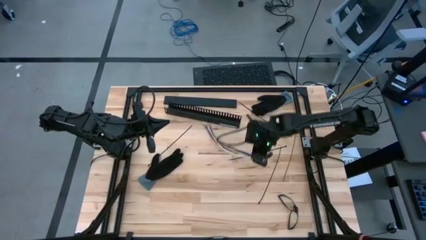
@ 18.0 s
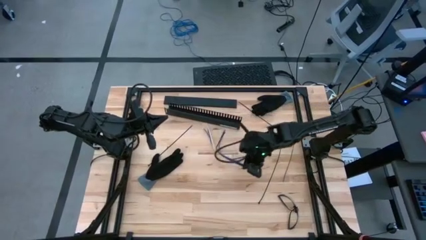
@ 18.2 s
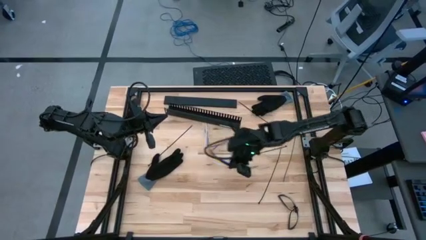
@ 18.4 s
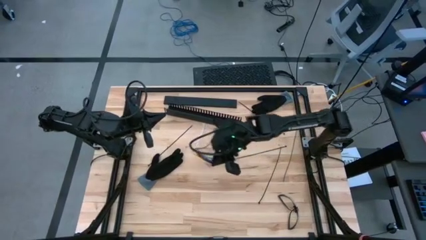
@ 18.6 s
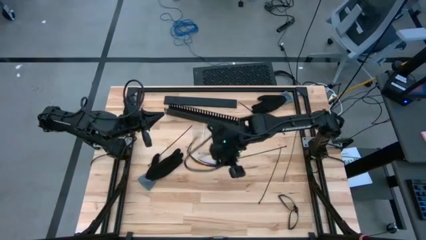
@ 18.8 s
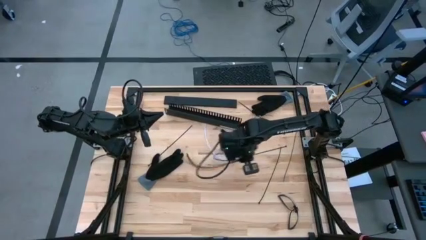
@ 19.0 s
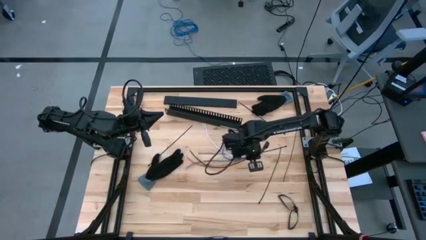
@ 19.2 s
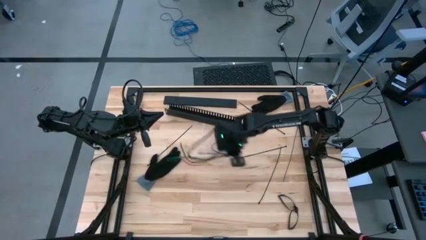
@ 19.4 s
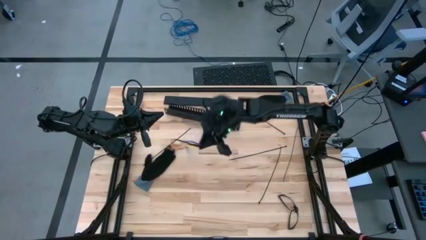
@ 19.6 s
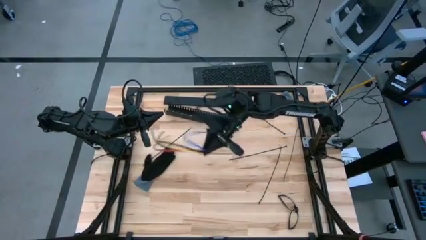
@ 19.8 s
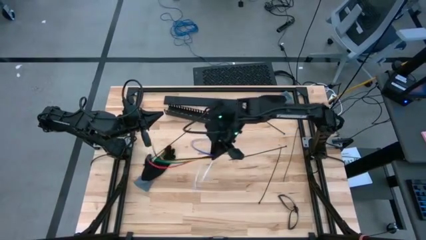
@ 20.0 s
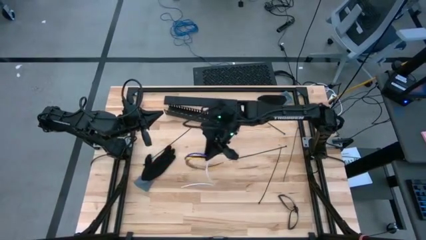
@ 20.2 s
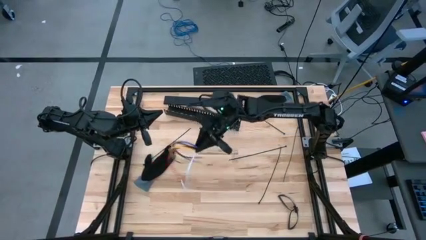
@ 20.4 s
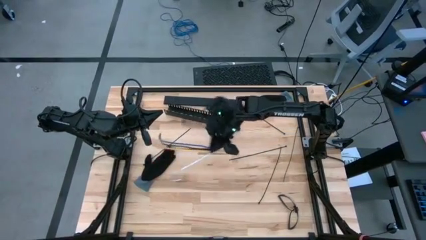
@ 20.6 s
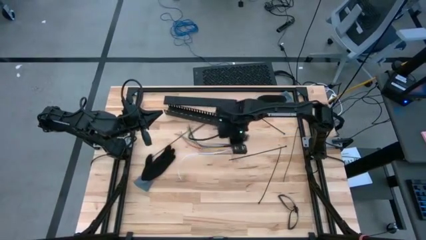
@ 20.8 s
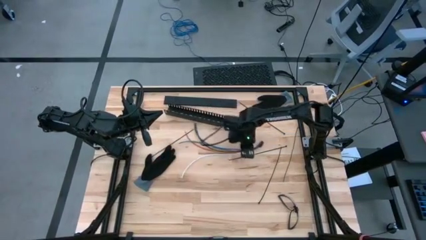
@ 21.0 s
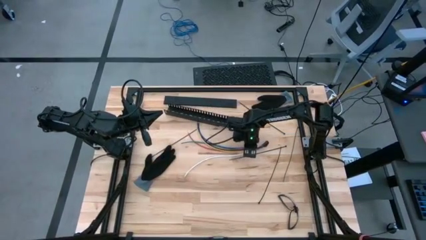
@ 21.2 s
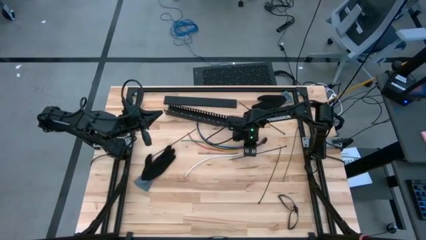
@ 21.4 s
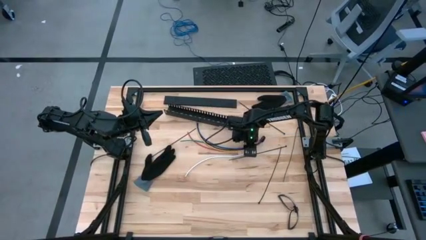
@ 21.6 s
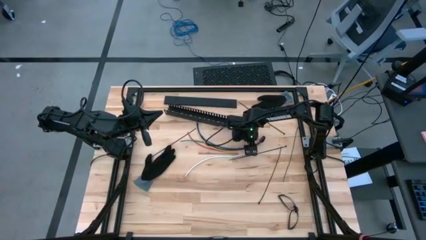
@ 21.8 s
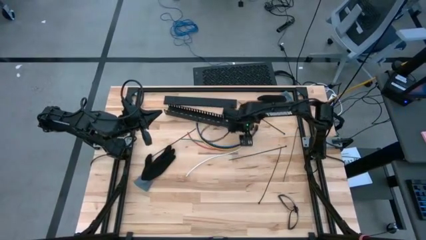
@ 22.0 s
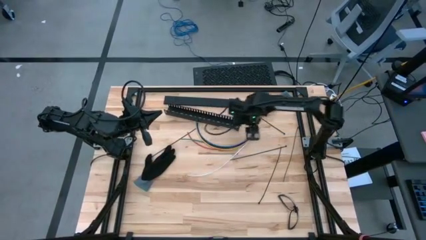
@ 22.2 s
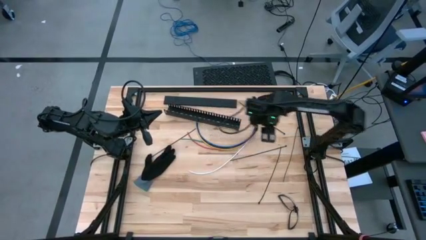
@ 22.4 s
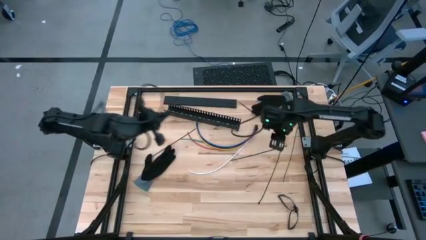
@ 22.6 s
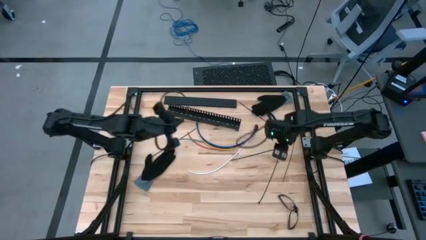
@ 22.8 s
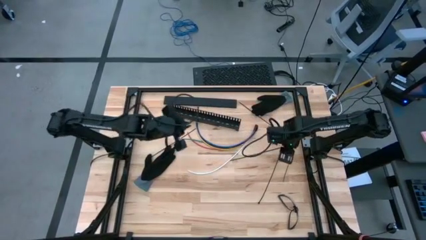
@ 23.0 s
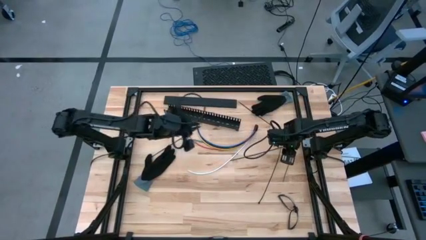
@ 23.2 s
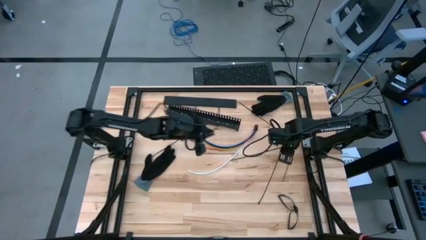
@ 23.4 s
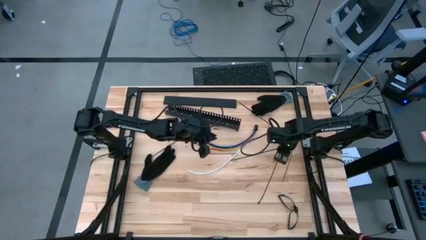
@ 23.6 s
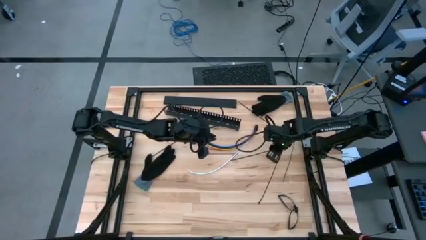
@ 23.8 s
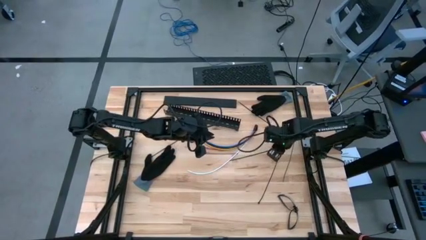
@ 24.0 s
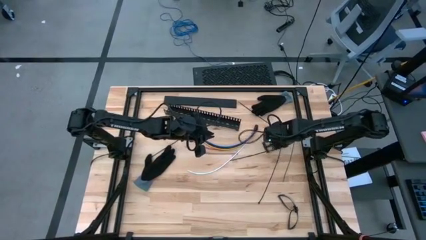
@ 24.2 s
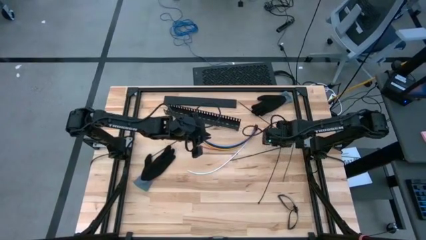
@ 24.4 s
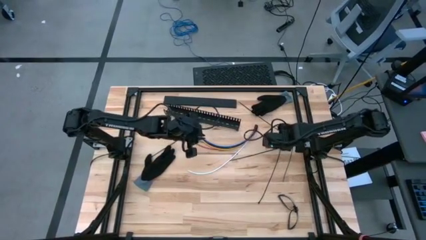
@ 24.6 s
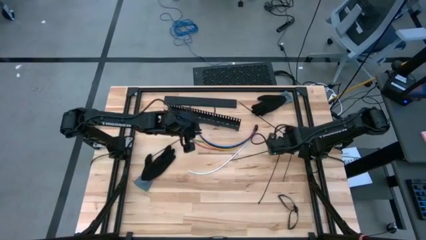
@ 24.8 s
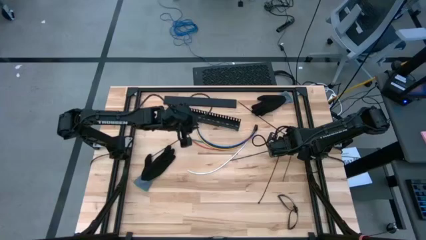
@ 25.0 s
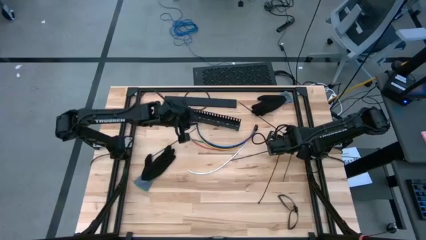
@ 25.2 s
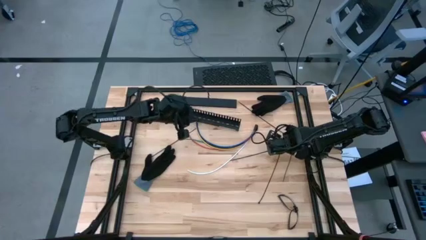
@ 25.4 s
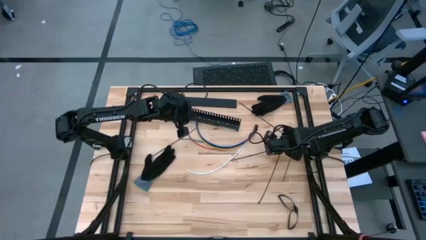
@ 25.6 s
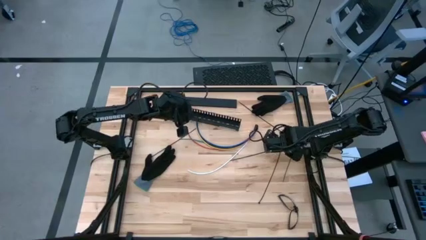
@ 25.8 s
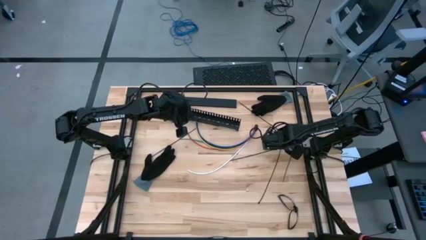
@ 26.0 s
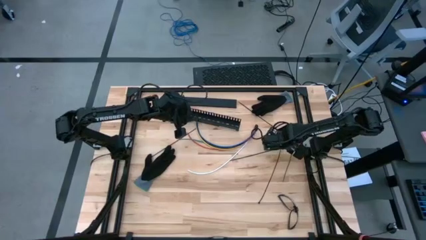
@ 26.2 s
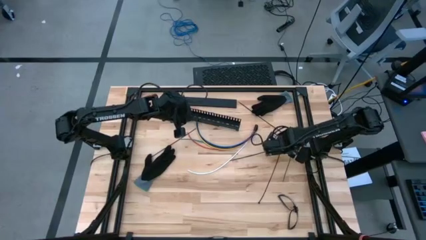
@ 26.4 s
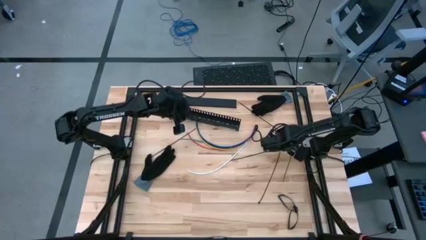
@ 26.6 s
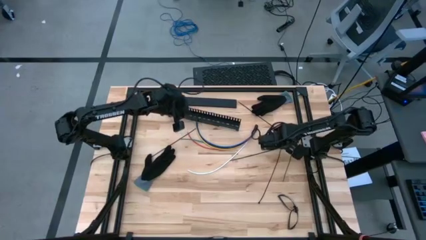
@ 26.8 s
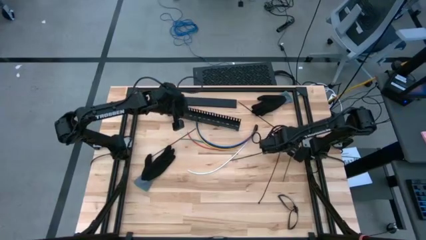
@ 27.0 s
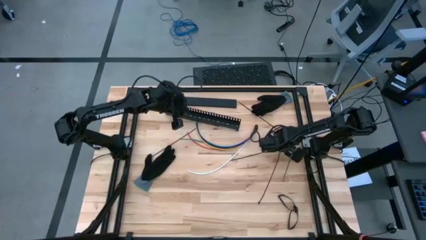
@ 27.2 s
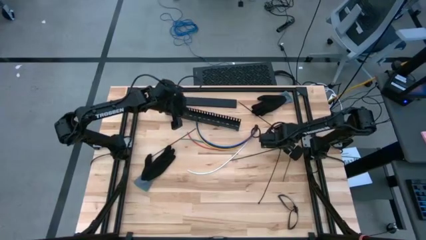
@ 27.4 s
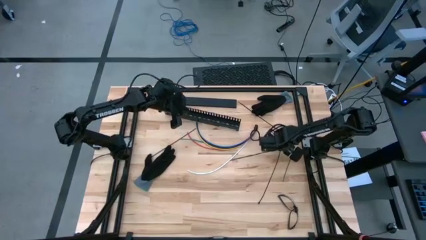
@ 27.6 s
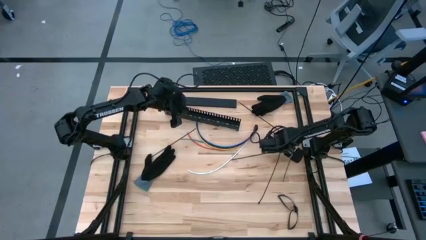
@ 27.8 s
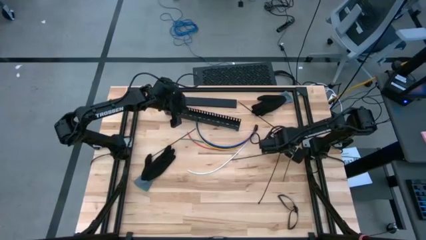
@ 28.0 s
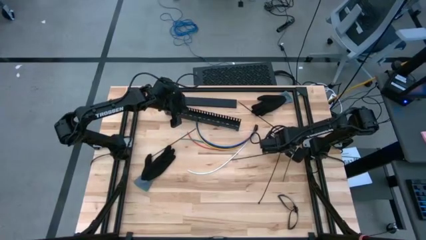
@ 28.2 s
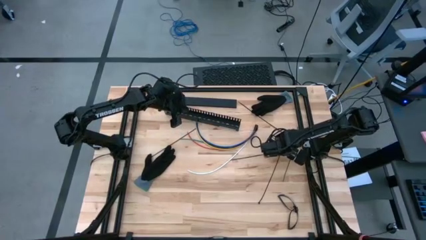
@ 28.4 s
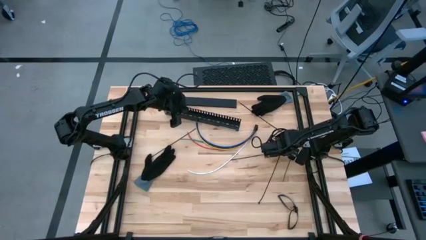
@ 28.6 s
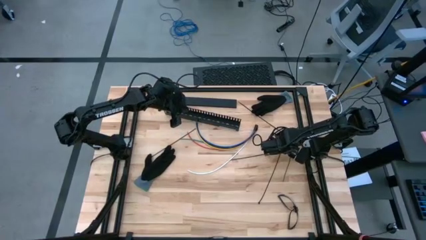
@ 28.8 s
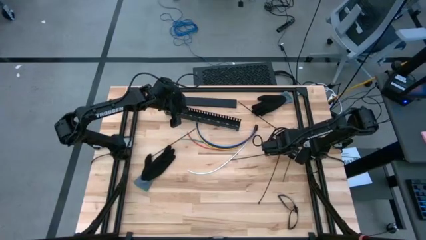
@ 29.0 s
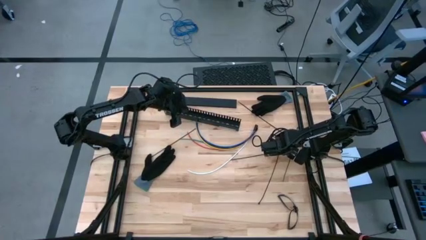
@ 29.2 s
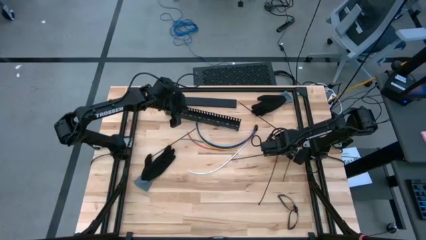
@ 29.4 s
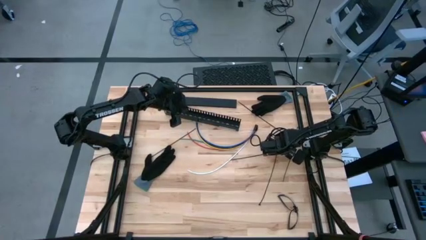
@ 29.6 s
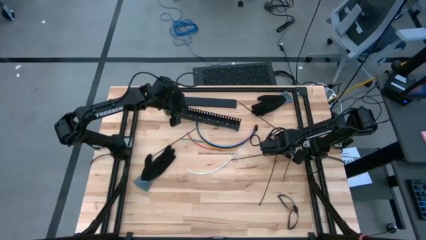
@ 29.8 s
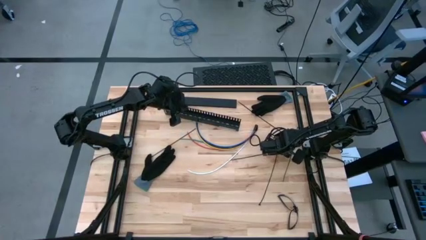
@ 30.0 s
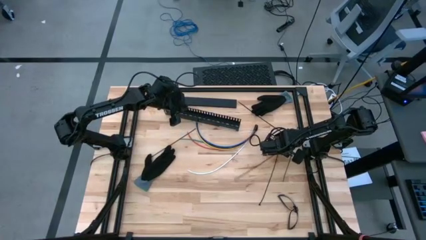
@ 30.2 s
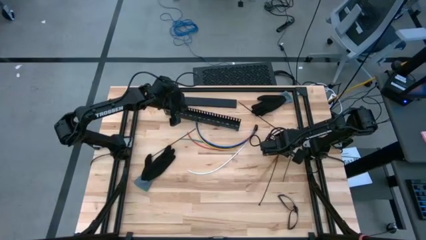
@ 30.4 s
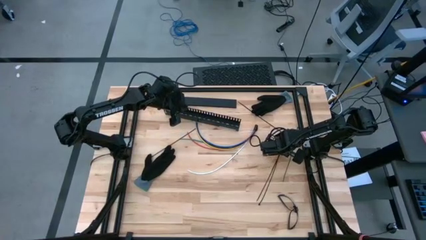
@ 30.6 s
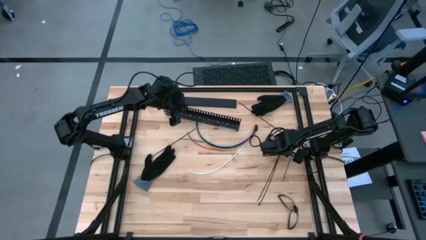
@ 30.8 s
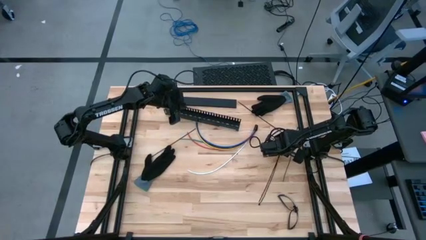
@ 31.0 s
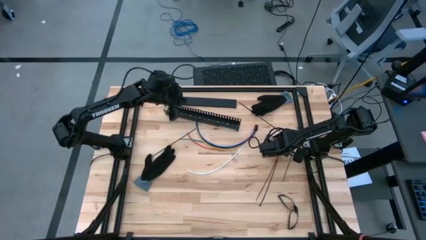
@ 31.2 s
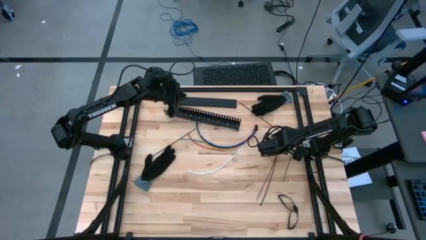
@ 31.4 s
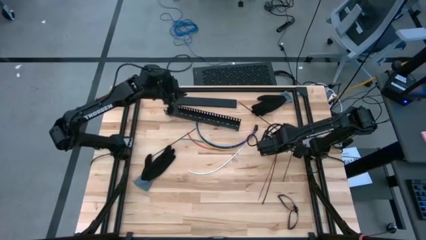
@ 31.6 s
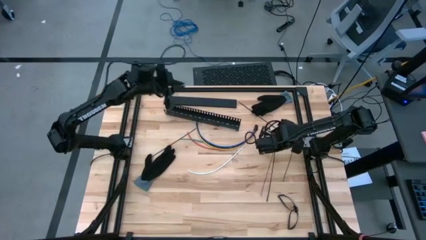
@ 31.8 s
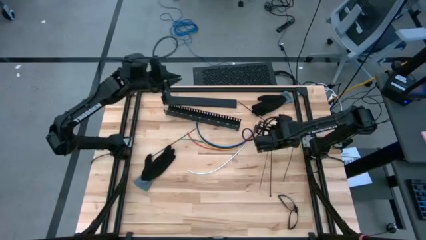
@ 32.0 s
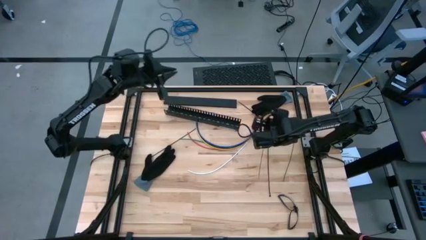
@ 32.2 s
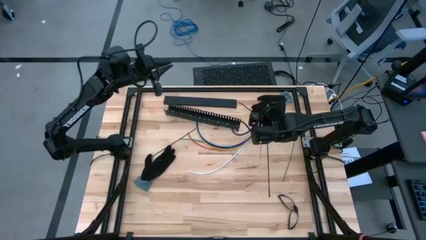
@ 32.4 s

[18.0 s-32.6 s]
Task: Ziptie cables
Prepare the zip tie
